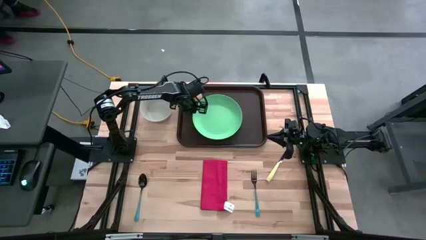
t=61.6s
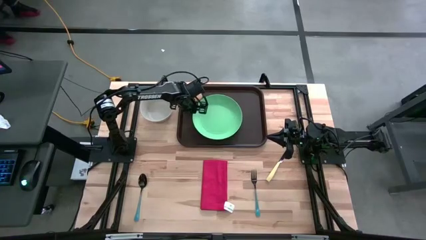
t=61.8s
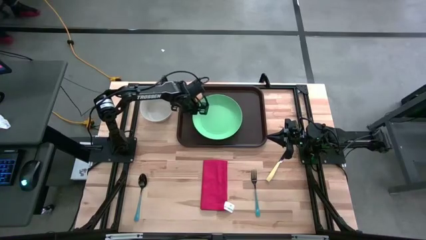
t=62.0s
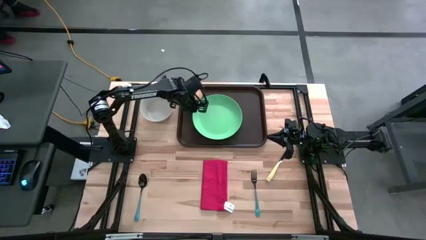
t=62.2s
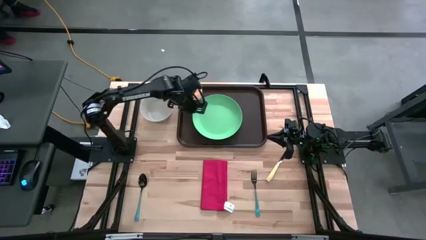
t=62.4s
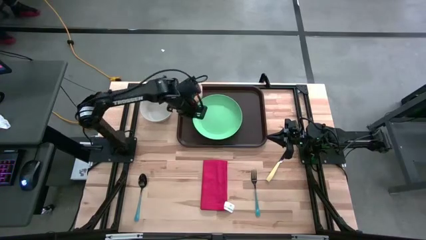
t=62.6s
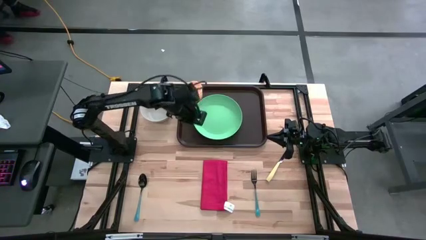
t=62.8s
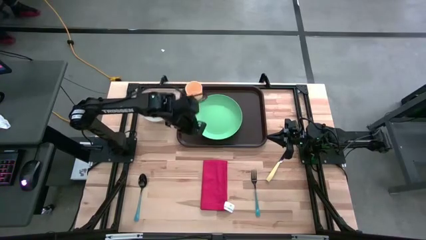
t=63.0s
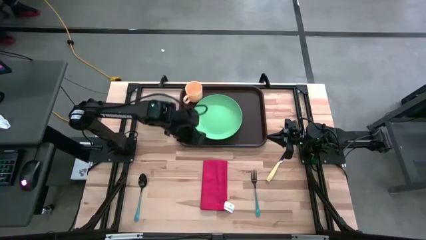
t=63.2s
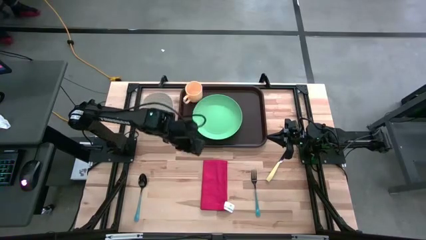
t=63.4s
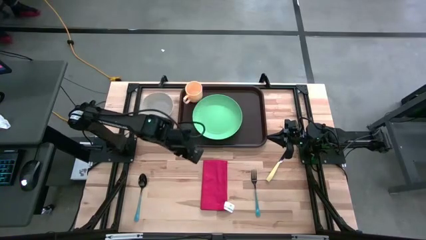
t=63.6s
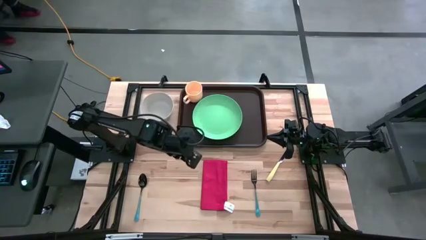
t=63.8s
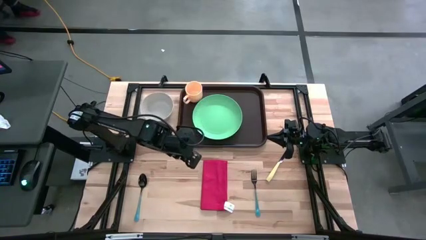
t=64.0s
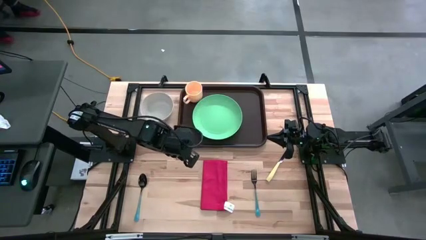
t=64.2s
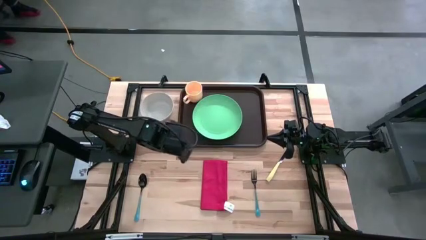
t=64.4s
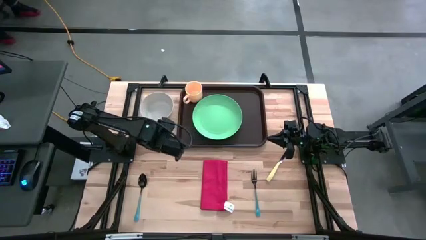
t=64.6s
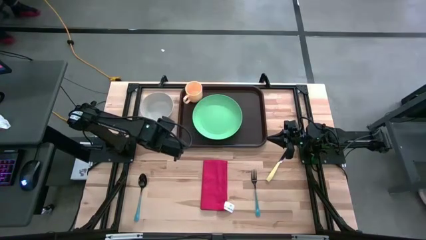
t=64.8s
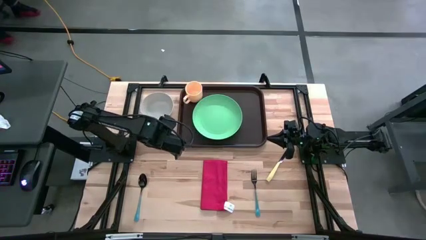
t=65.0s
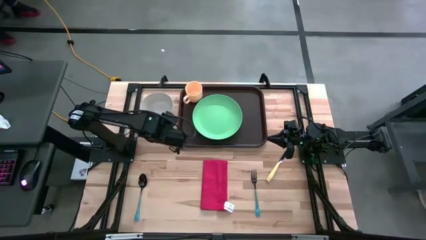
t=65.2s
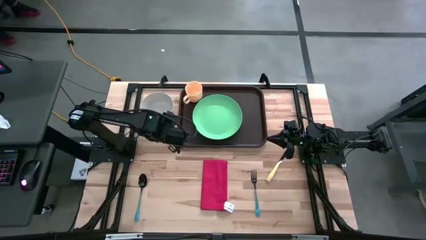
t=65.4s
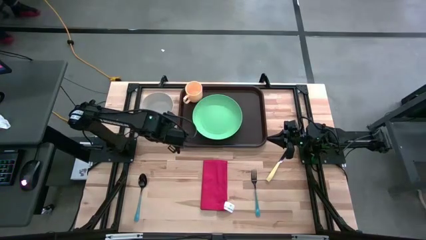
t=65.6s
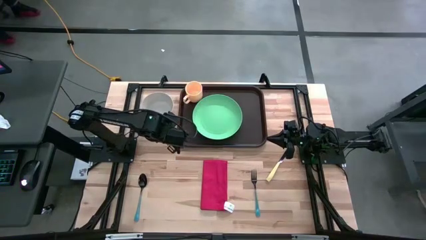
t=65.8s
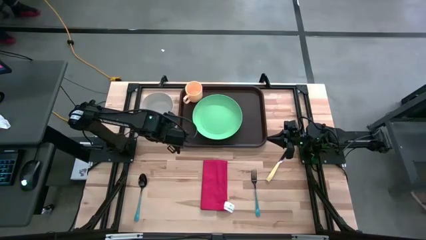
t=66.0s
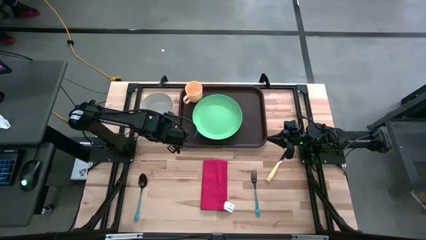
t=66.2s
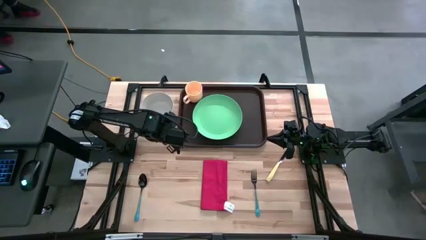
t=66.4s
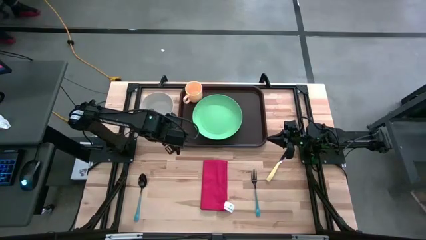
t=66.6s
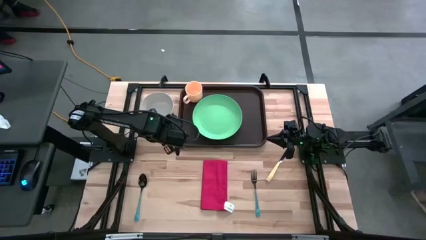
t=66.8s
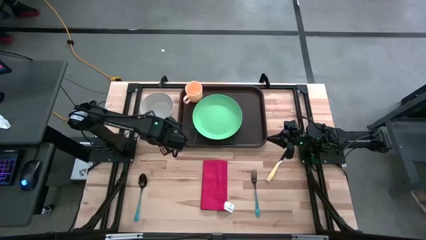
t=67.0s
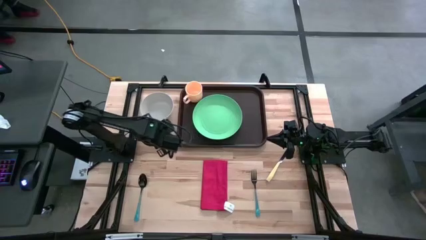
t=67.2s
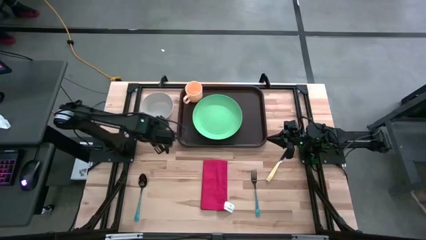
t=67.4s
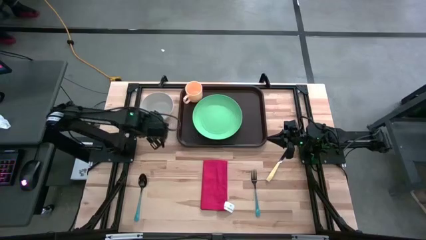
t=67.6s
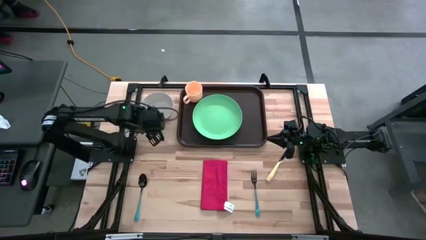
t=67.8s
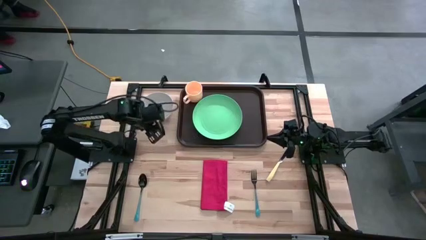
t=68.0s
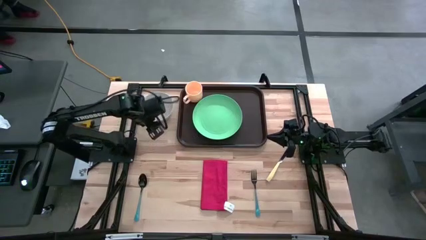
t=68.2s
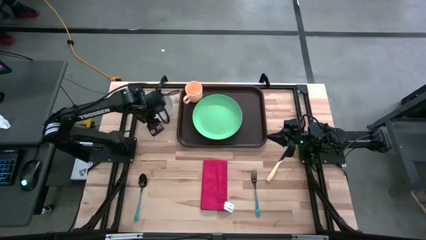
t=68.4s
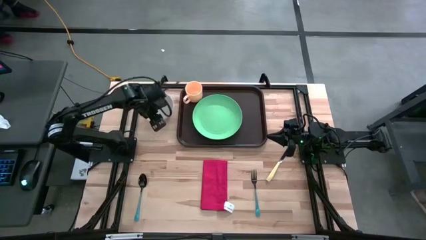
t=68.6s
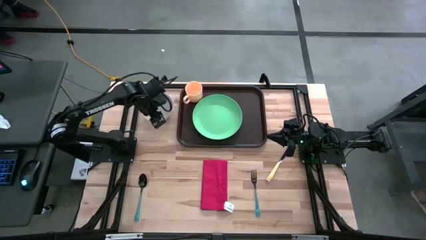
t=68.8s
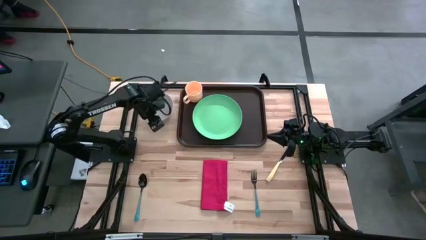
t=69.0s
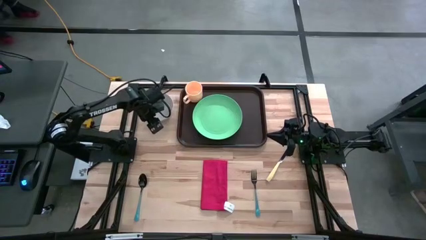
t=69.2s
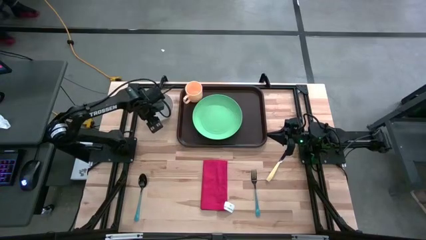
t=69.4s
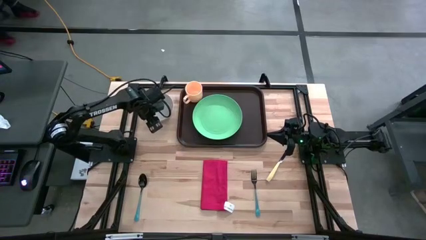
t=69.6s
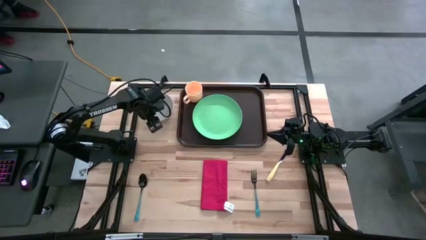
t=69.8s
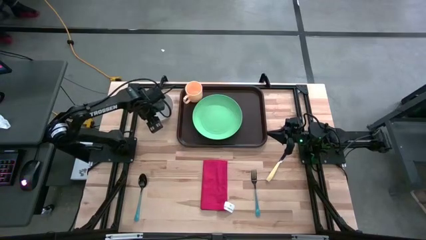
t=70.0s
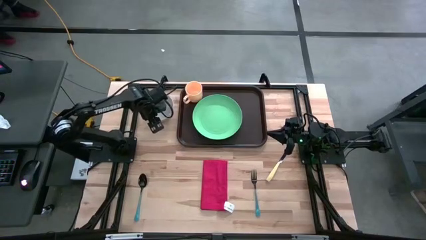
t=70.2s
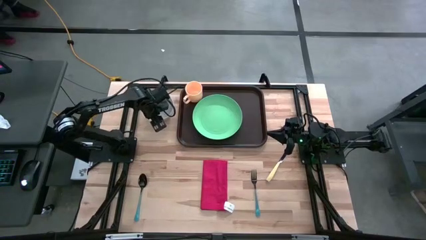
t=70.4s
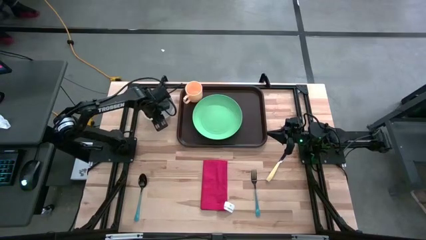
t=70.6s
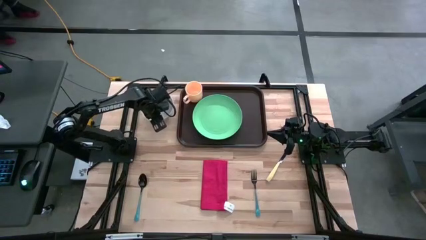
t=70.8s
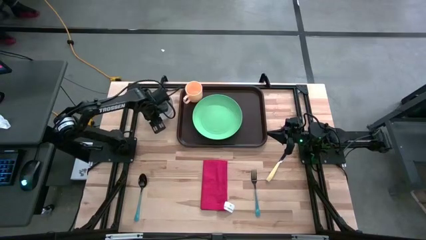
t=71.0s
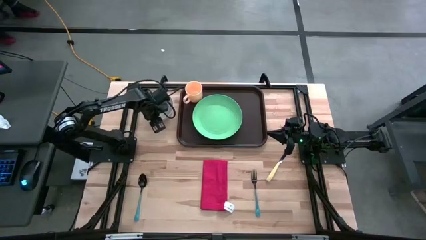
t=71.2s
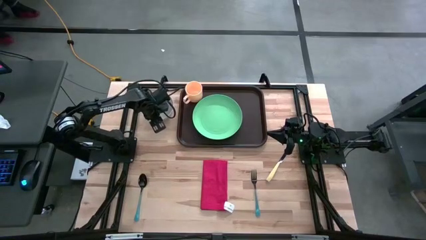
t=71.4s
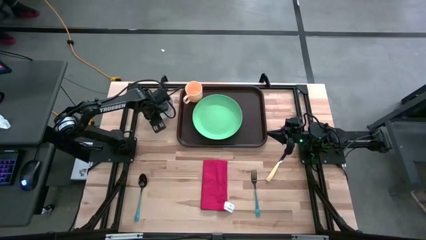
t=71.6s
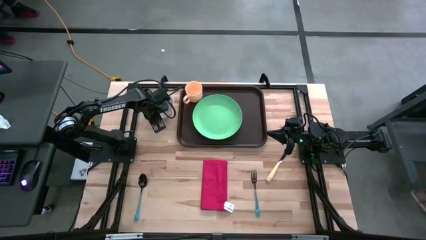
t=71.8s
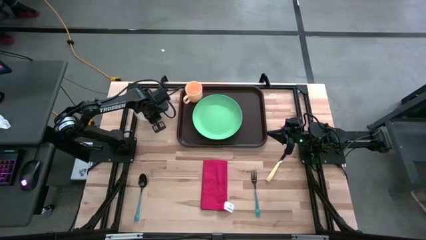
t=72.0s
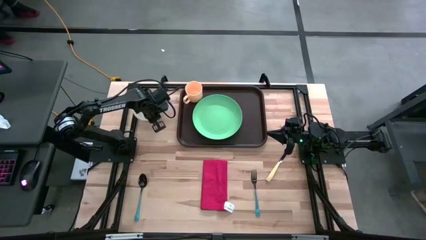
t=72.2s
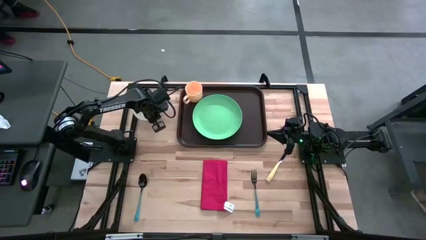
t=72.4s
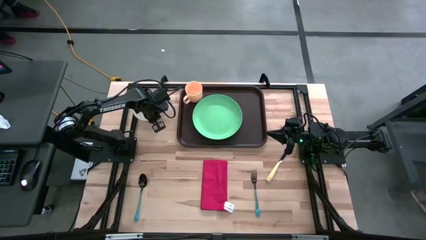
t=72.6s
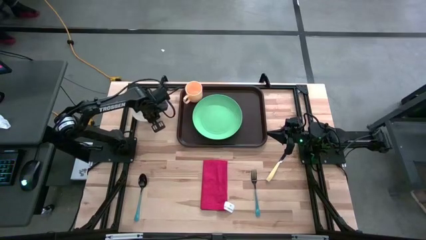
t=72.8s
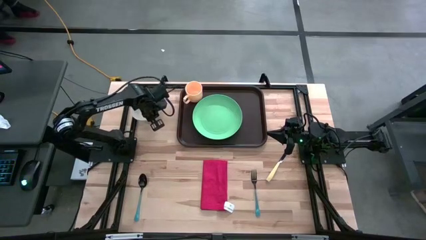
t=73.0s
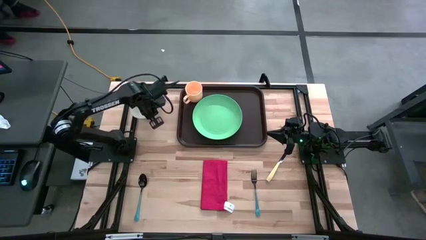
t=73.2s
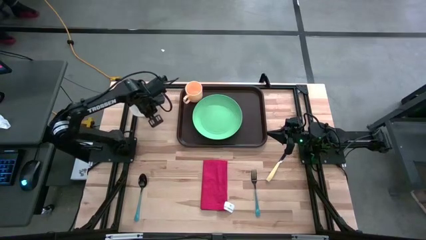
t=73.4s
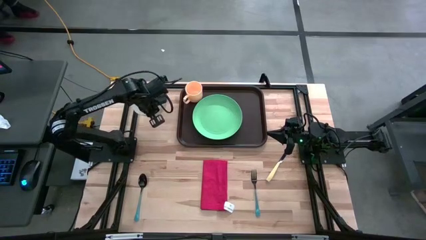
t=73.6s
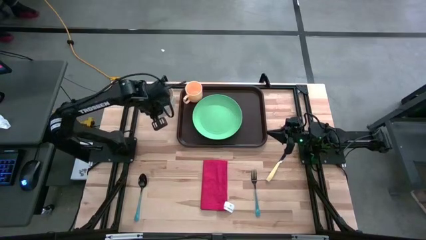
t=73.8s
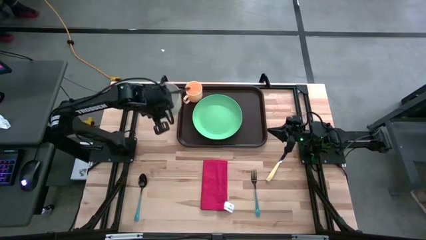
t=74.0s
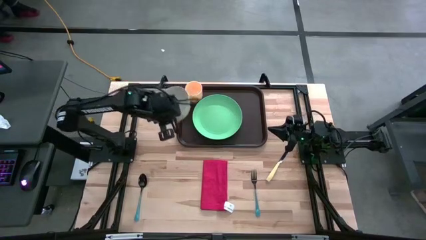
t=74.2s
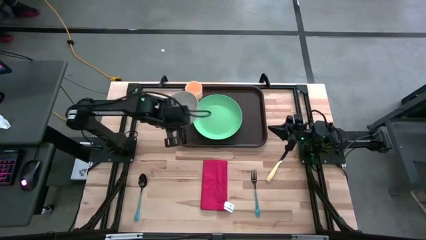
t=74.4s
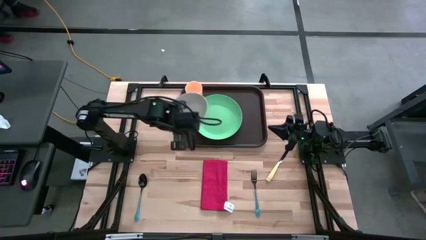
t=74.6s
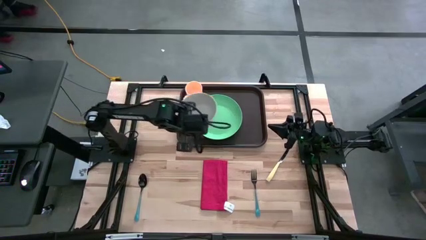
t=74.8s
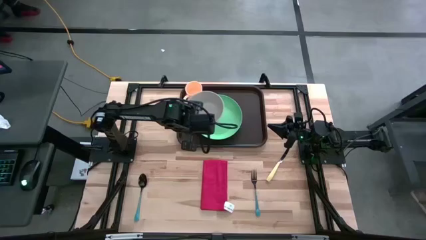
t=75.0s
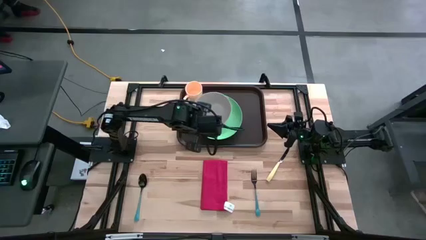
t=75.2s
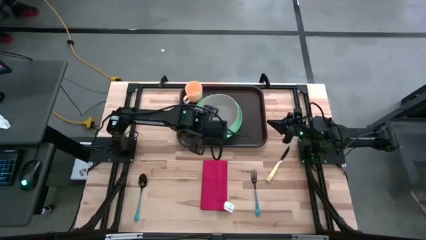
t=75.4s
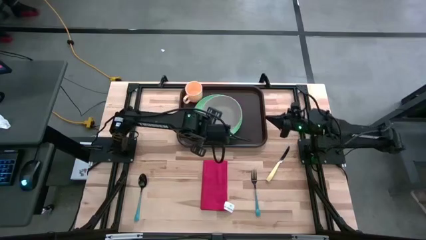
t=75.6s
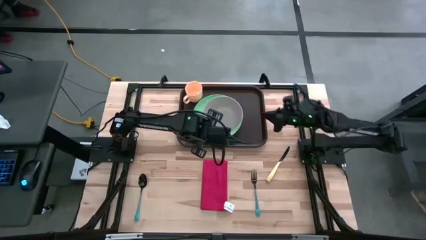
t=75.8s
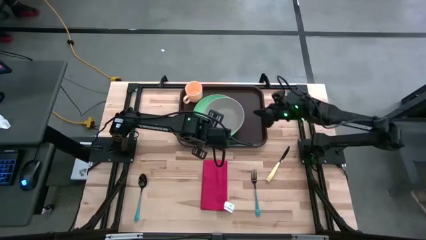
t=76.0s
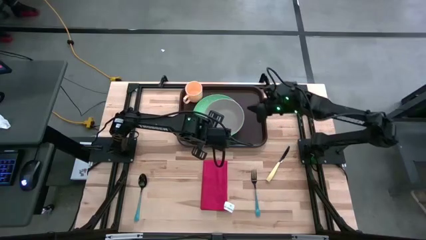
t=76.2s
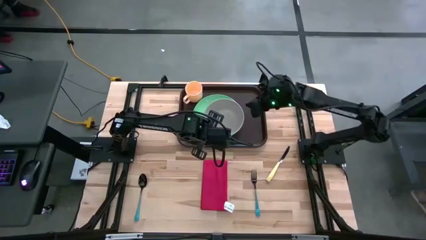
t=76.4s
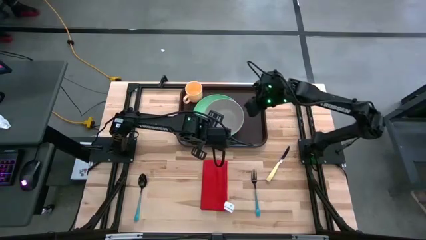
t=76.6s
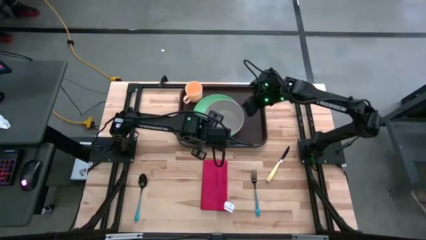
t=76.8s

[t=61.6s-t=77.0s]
Task: Set up tray
Put the gray bowl on top of the green plate to the bottom of the yellow mug

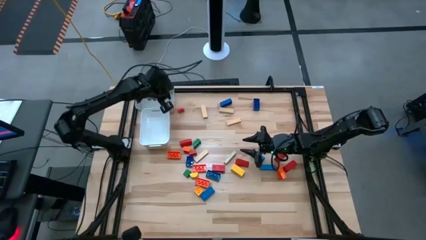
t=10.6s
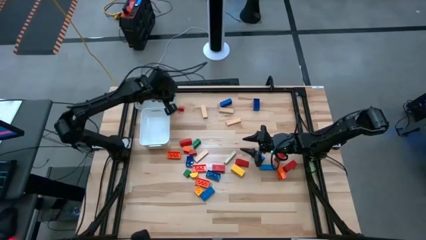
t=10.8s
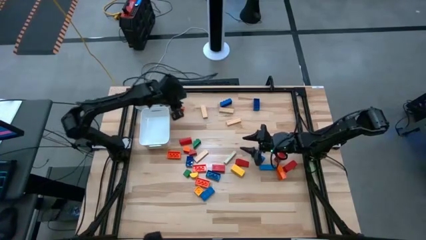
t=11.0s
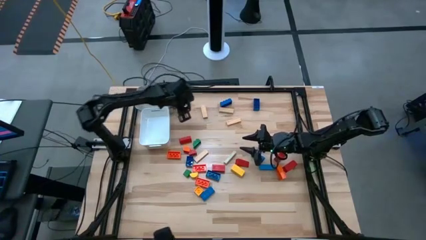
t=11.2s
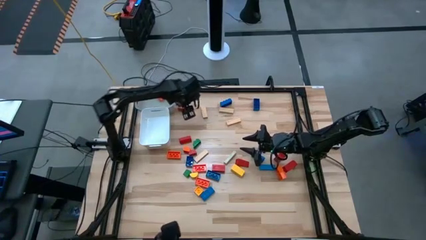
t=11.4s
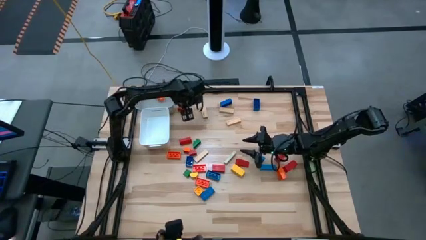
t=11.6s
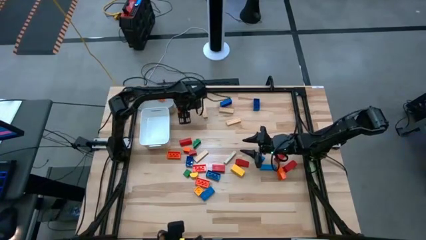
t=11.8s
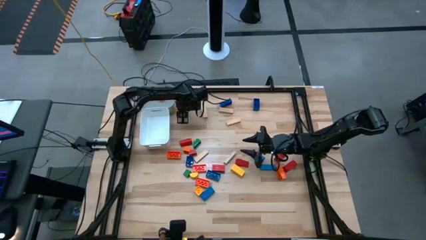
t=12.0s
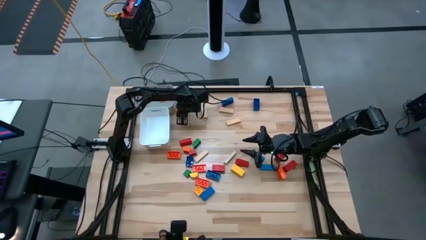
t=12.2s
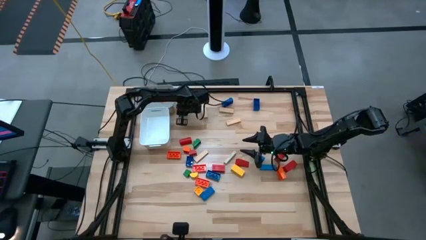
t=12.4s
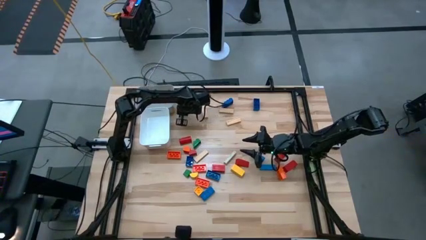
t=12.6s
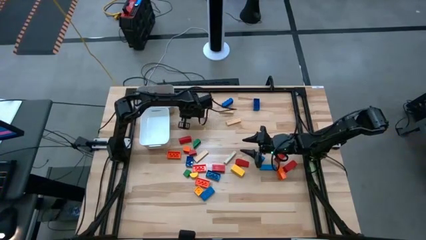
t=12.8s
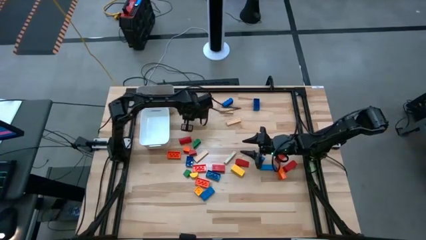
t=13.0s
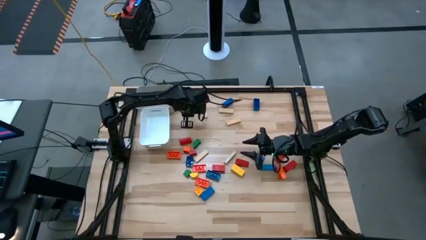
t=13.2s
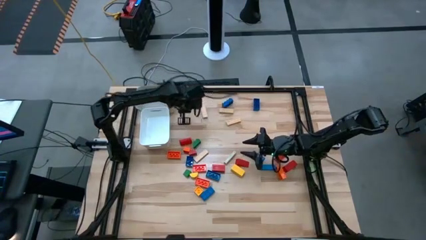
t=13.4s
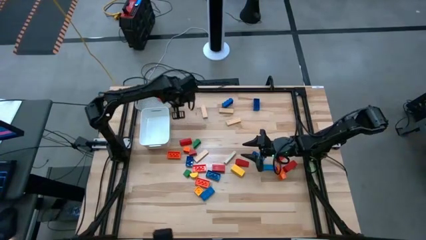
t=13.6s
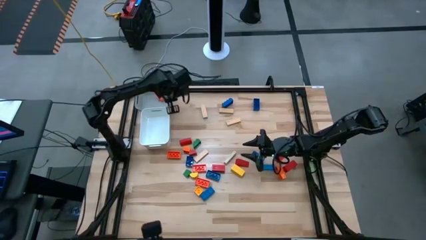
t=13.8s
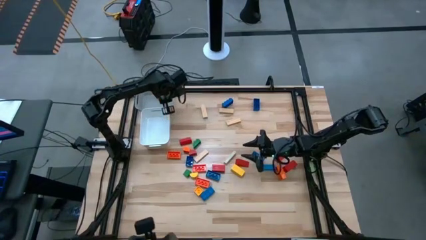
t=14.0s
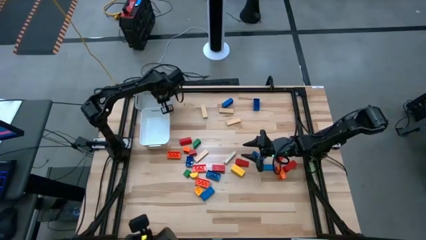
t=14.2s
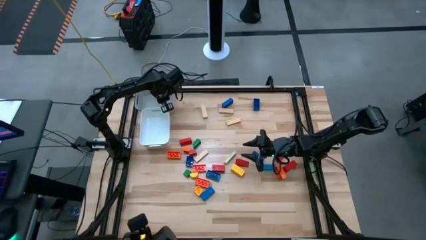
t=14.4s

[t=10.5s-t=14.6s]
Task: Sort blocks by size
Put the small red wooden block into the gray bin
